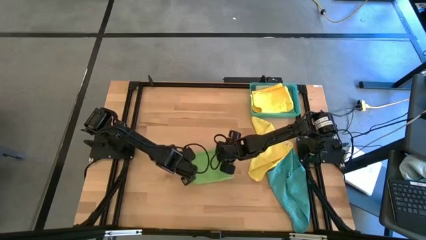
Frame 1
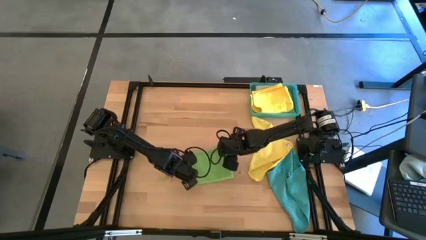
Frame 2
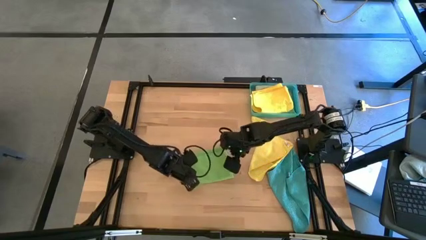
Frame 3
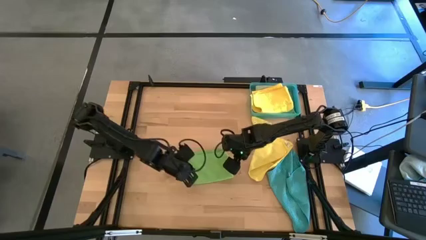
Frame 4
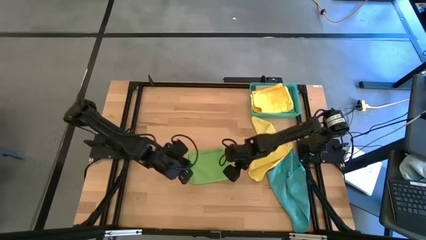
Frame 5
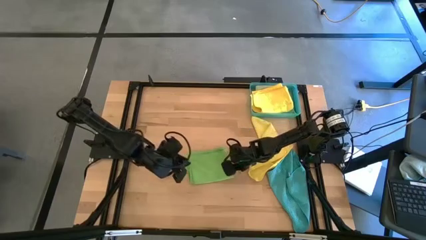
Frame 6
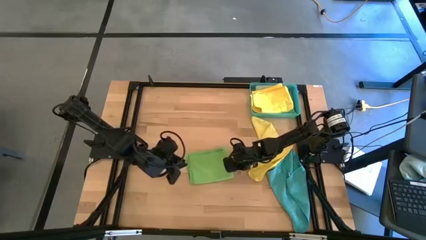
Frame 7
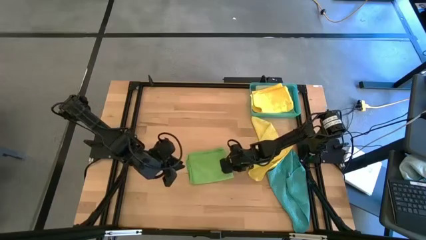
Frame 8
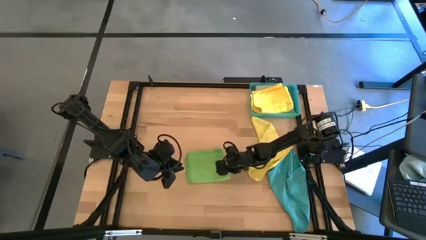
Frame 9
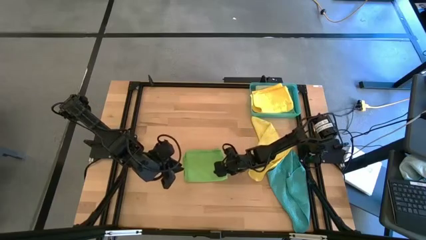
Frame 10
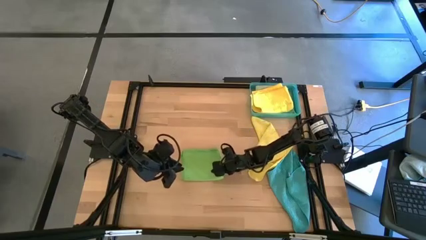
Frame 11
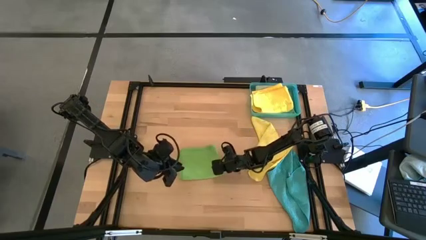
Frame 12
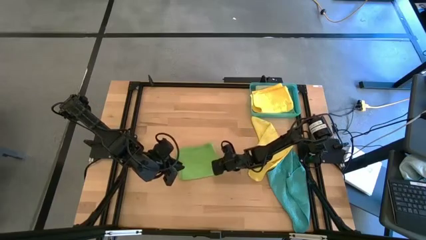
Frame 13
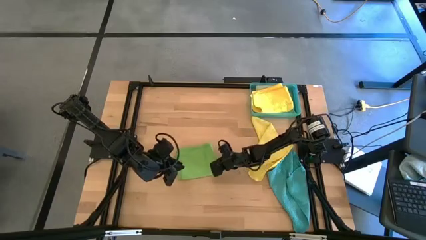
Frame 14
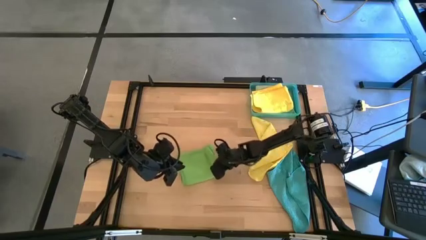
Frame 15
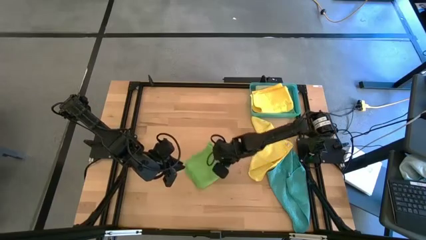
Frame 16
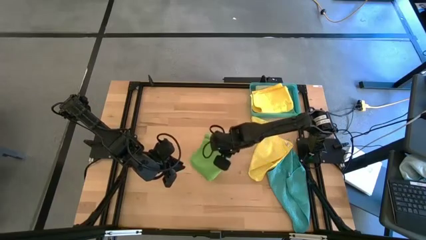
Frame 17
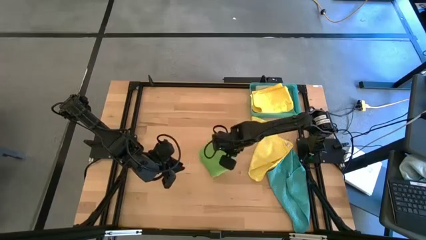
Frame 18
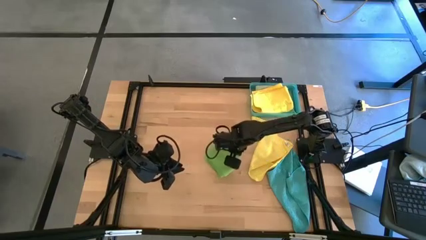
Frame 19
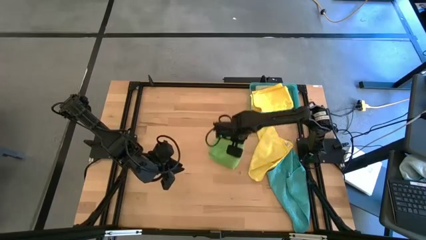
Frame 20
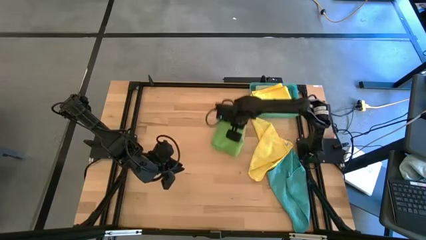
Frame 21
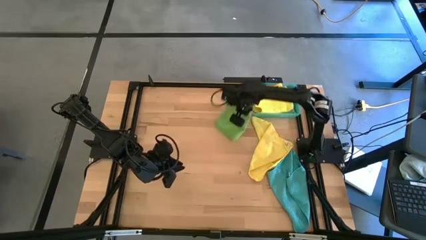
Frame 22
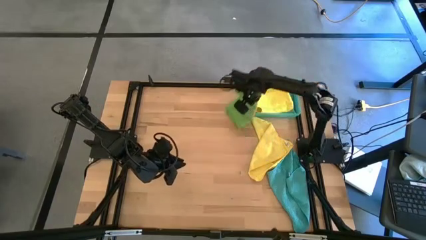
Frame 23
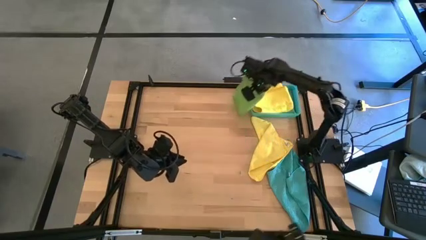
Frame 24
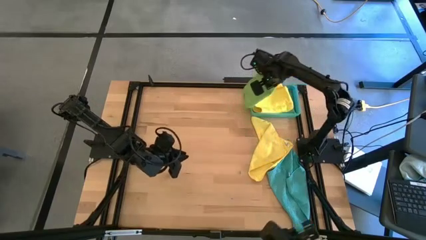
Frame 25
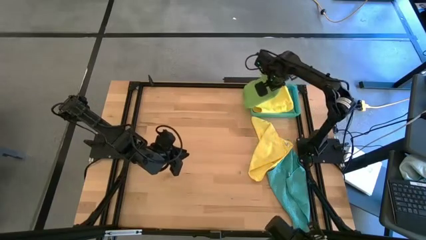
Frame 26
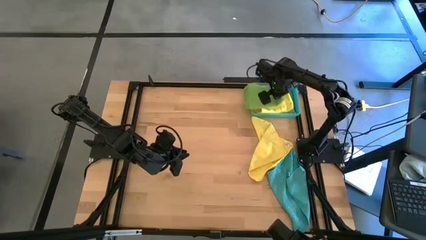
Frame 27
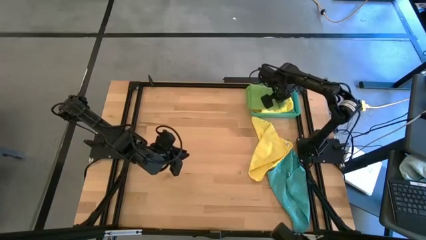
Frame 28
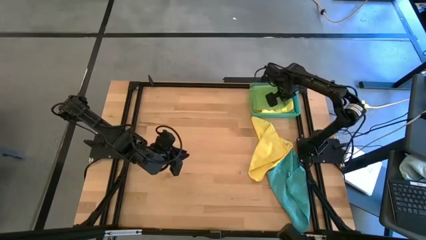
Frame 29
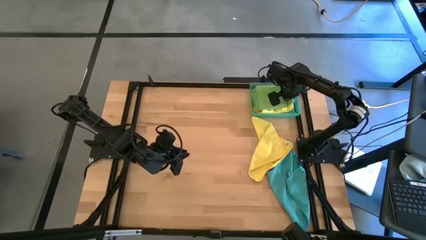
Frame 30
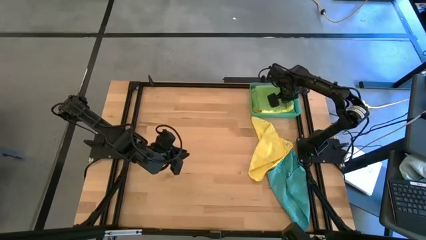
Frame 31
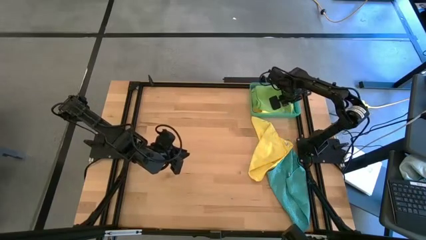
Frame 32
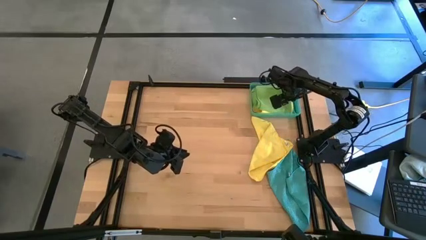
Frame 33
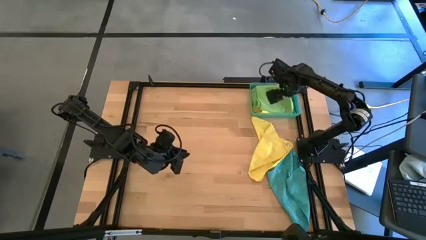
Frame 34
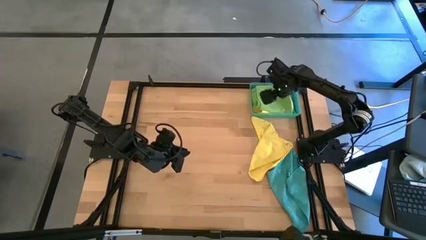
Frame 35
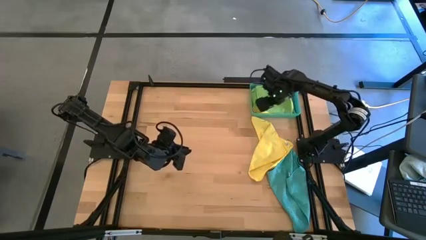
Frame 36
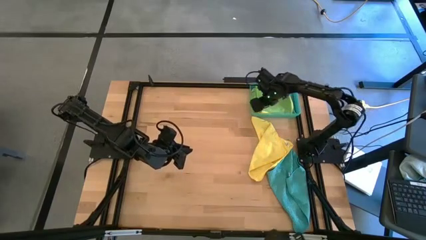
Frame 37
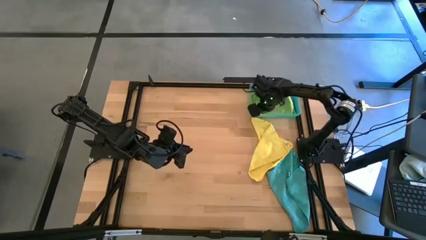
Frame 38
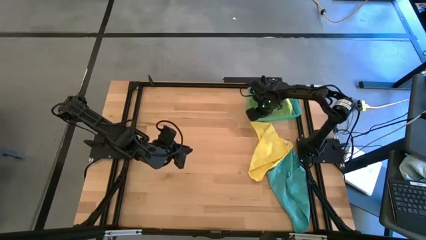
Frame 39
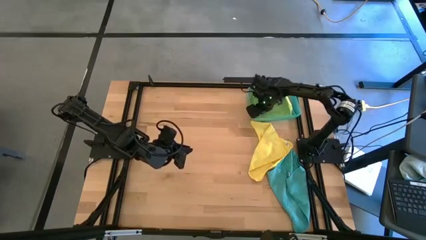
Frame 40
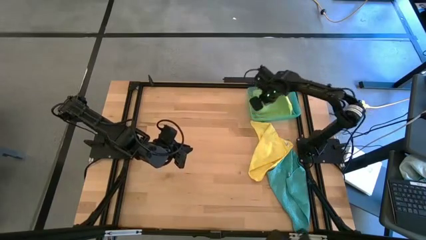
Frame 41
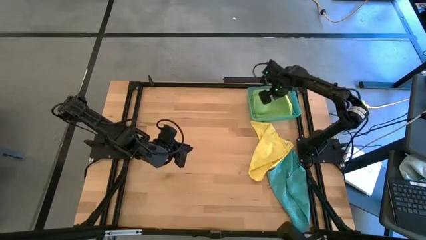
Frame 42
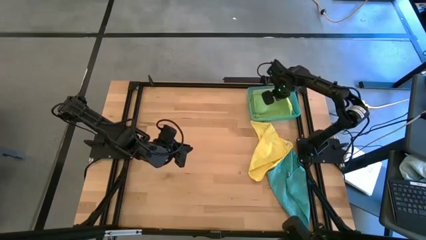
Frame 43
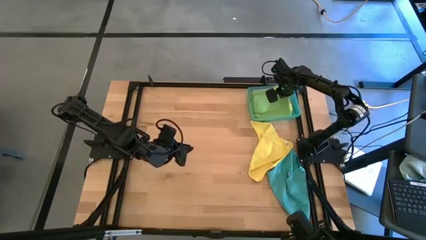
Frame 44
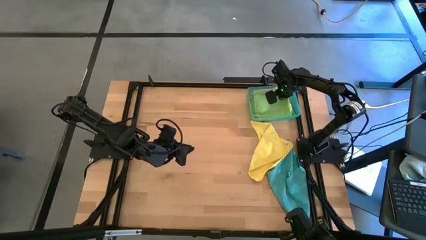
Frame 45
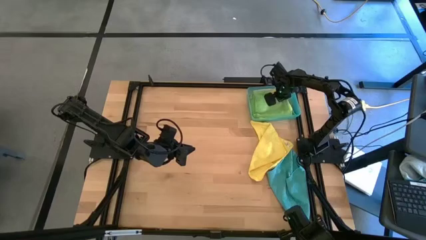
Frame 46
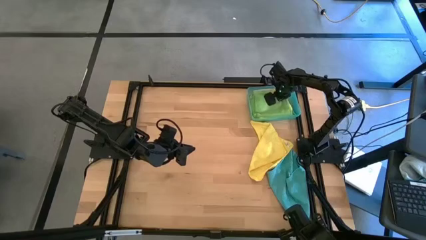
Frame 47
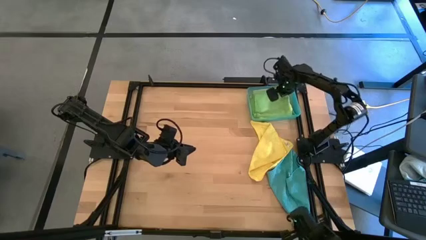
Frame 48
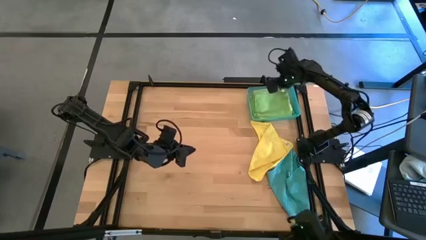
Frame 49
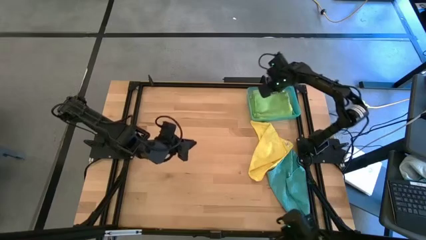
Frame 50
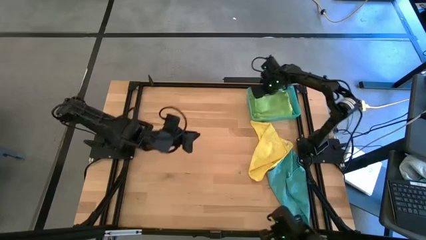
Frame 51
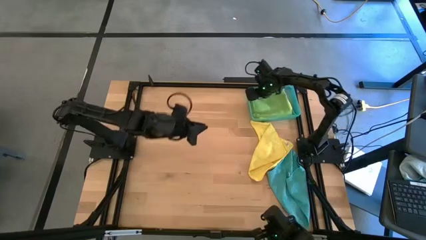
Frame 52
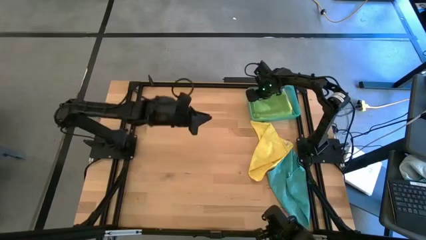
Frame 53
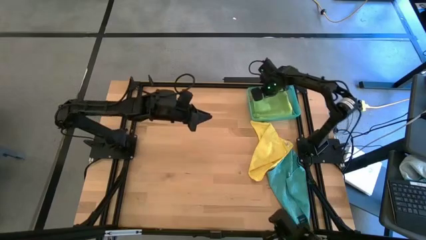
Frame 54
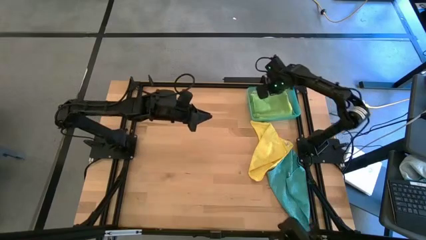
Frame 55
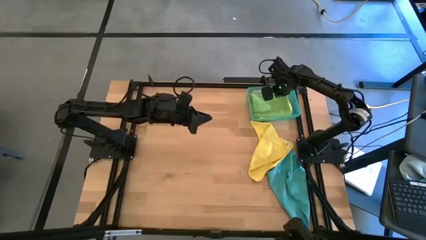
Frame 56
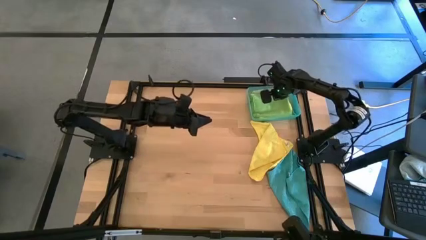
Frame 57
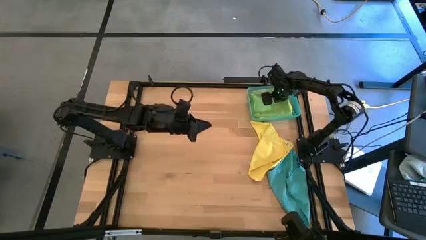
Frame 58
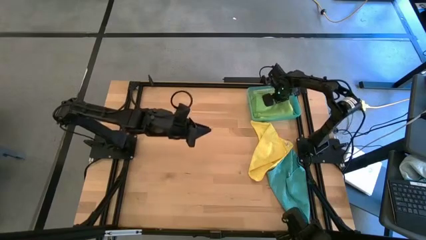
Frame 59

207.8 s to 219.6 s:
Task: Fold microfiber towels
Stack the folded green microfiber cloth on top of the folded yellow microfiber cloth

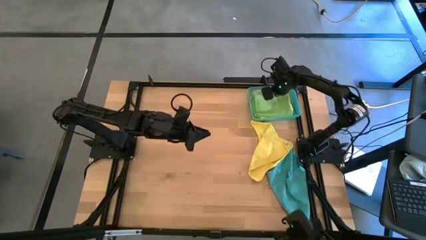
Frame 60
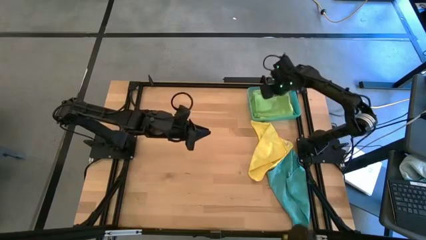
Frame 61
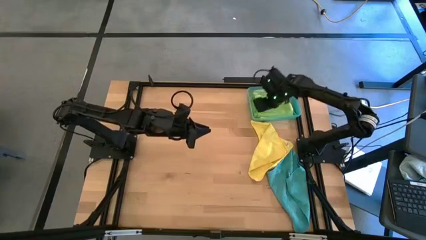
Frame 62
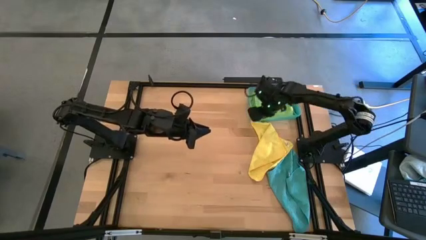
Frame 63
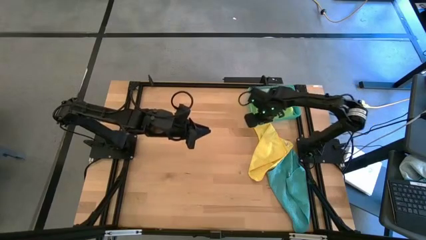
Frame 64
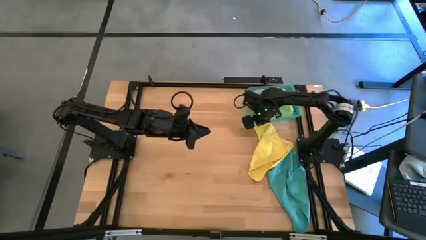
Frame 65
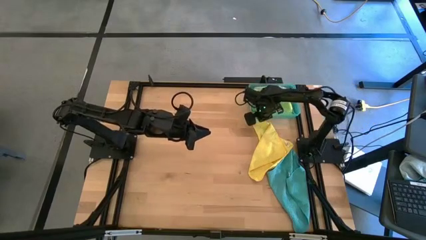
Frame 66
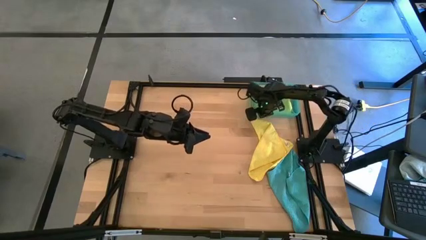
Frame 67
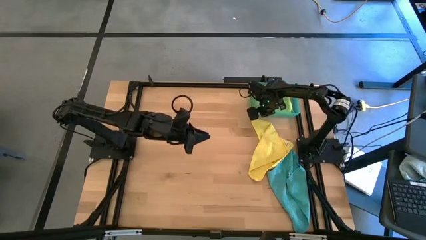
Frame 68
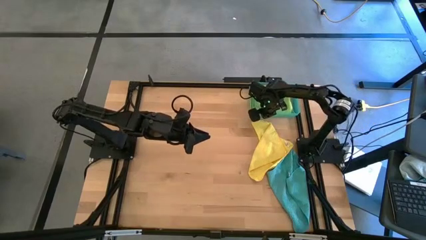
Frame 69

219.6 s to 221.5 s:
Adjust the blue bin
